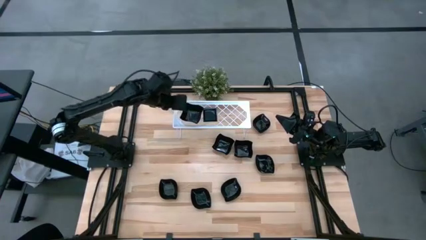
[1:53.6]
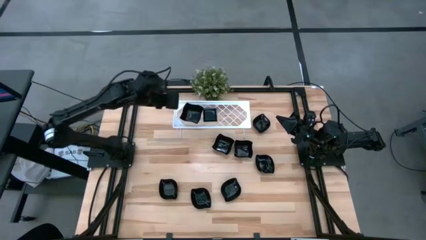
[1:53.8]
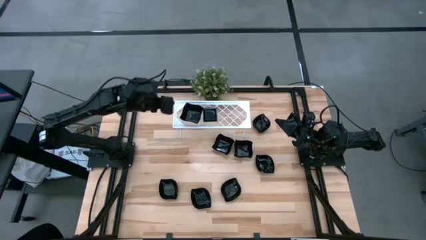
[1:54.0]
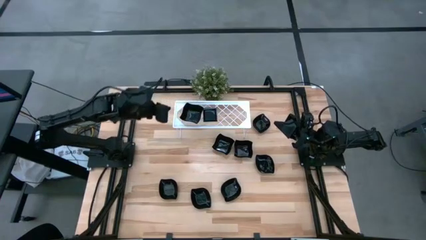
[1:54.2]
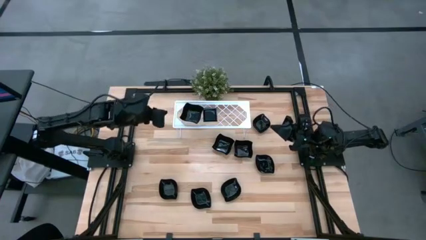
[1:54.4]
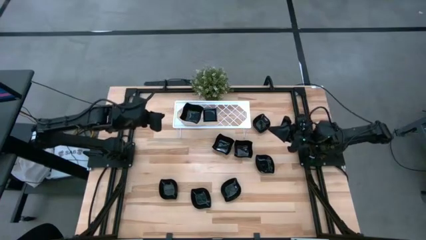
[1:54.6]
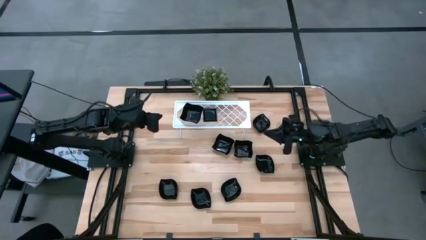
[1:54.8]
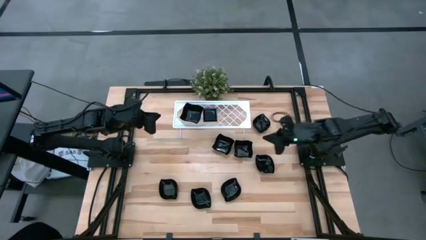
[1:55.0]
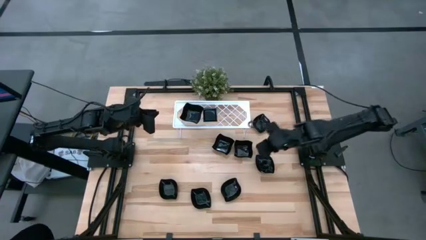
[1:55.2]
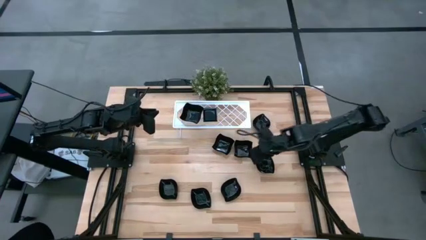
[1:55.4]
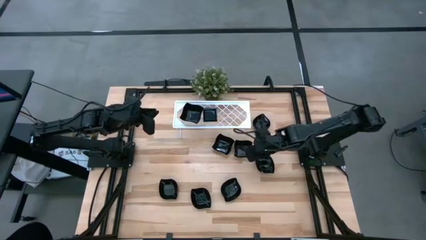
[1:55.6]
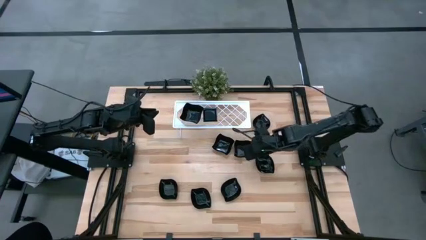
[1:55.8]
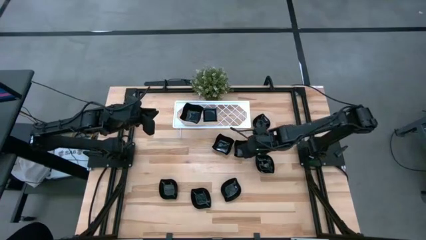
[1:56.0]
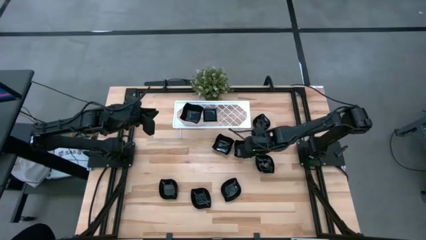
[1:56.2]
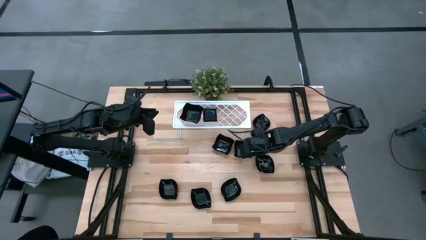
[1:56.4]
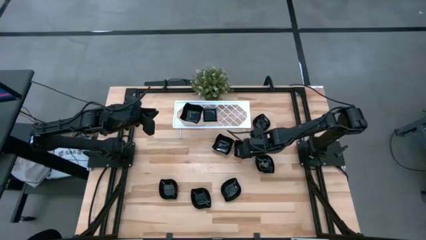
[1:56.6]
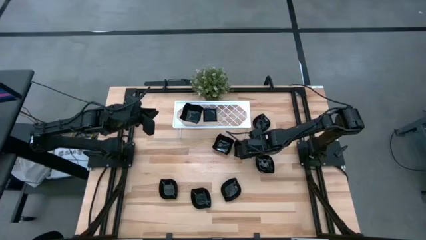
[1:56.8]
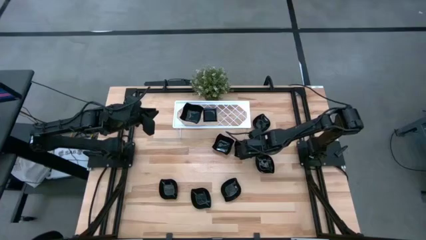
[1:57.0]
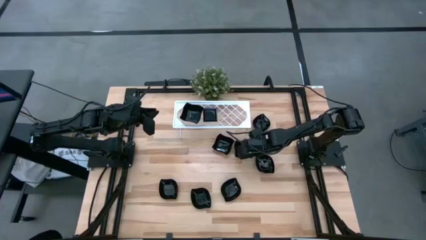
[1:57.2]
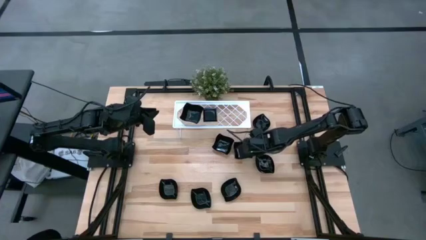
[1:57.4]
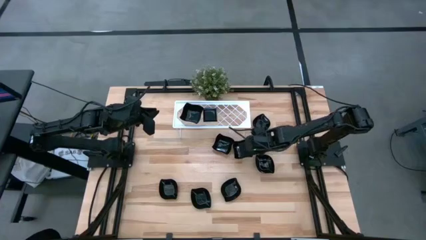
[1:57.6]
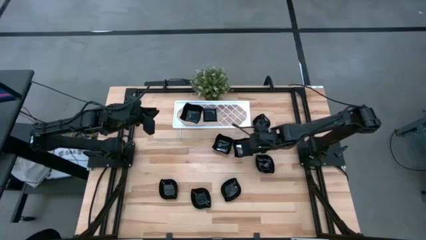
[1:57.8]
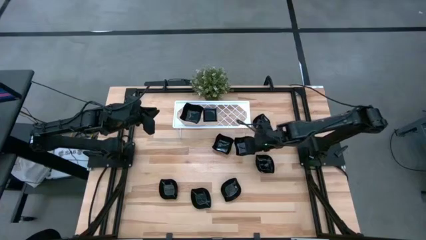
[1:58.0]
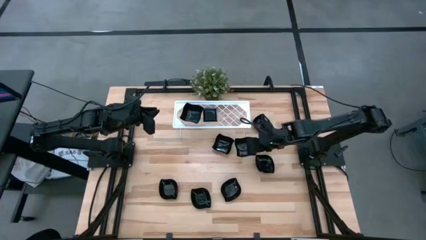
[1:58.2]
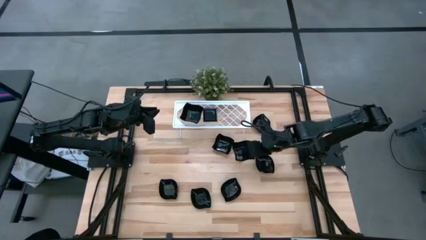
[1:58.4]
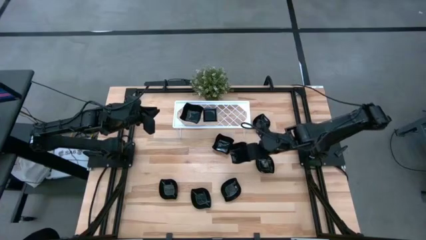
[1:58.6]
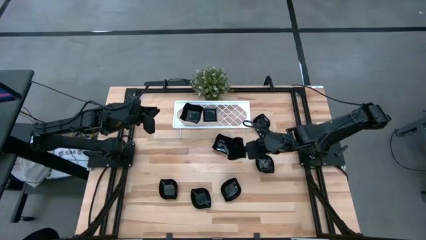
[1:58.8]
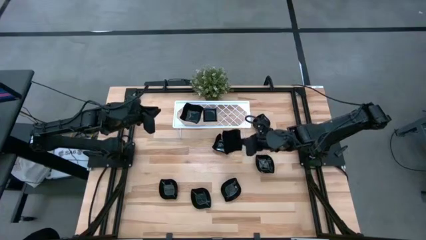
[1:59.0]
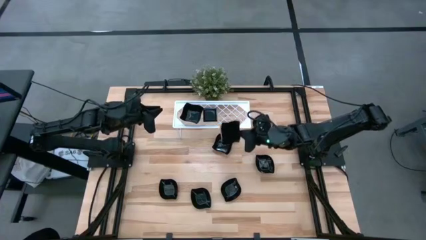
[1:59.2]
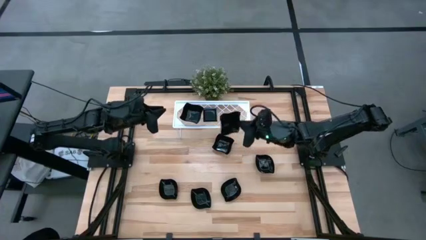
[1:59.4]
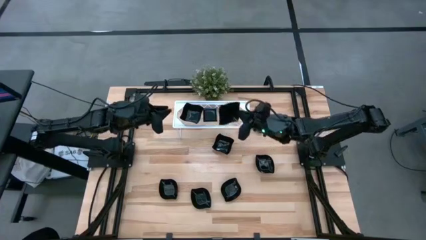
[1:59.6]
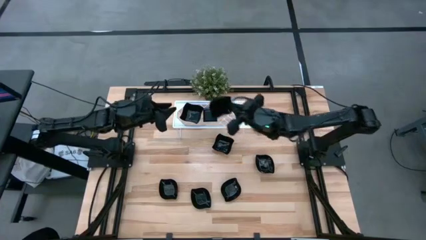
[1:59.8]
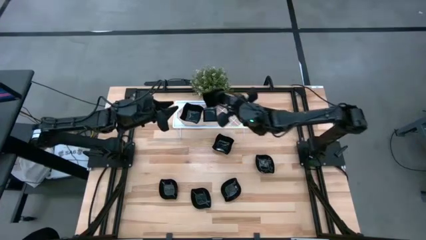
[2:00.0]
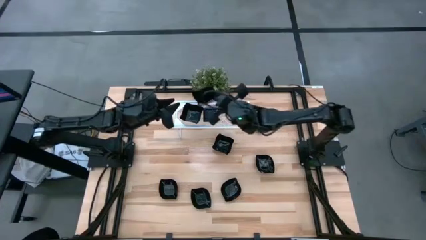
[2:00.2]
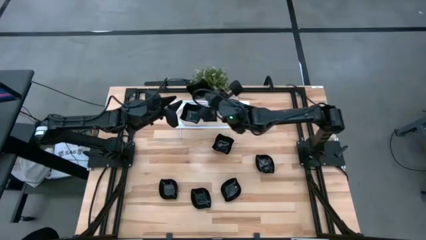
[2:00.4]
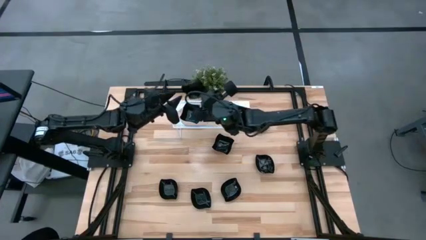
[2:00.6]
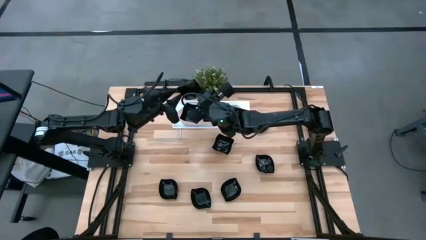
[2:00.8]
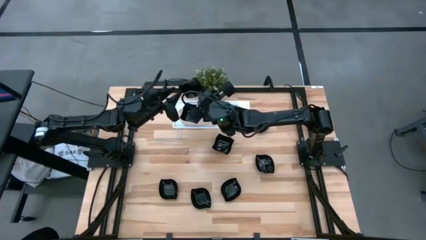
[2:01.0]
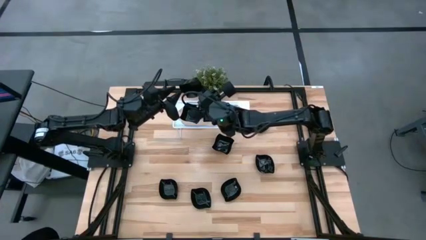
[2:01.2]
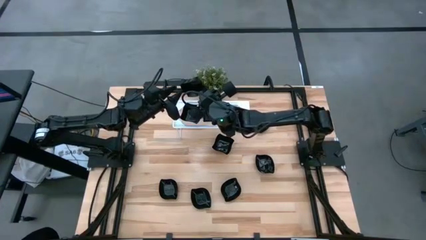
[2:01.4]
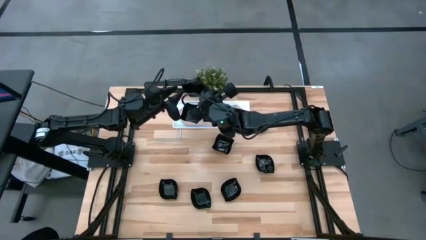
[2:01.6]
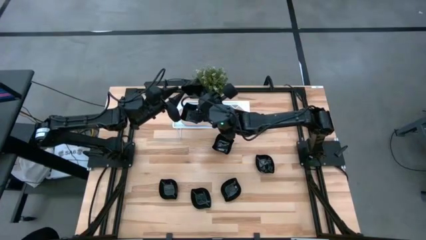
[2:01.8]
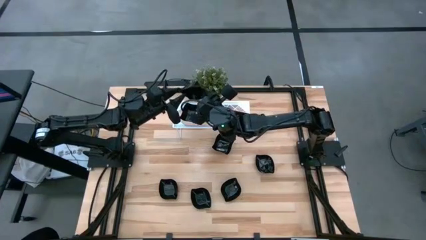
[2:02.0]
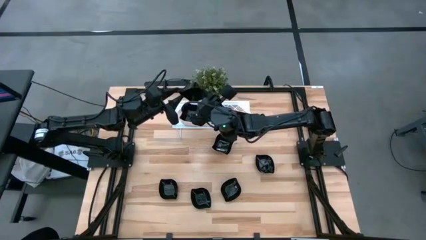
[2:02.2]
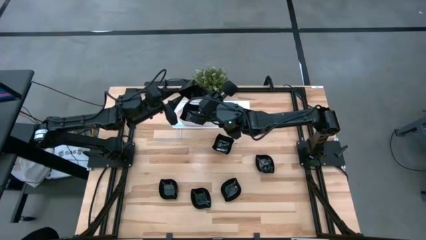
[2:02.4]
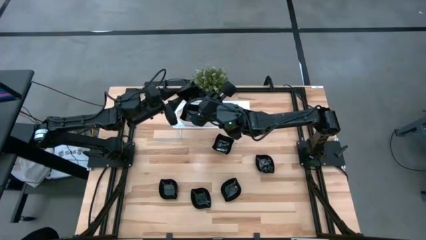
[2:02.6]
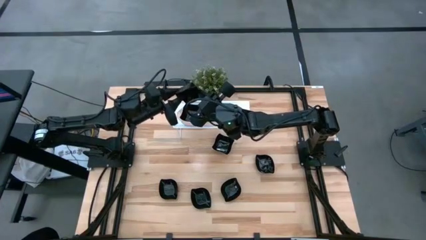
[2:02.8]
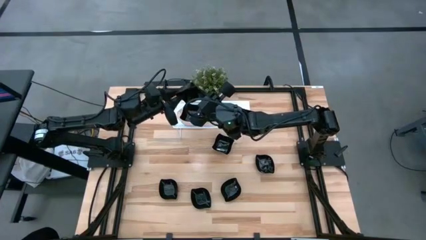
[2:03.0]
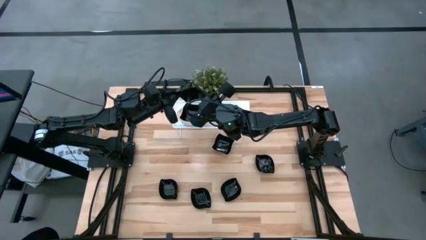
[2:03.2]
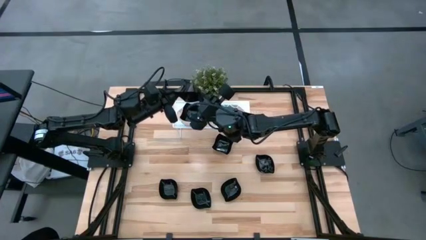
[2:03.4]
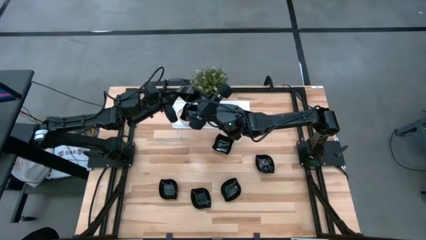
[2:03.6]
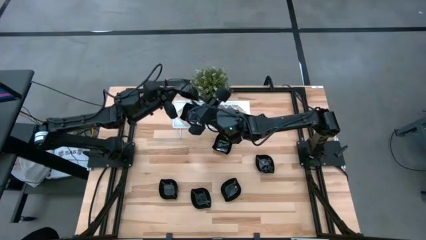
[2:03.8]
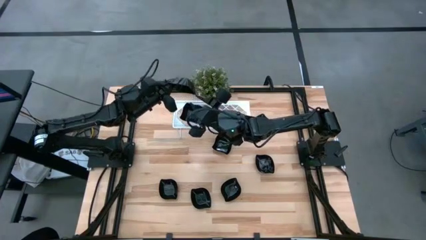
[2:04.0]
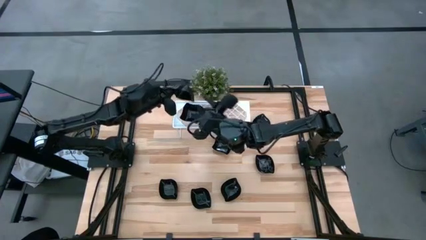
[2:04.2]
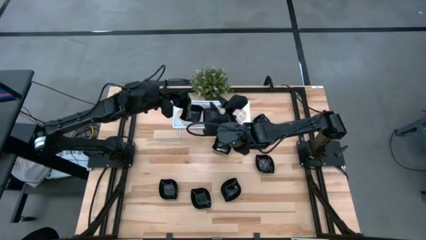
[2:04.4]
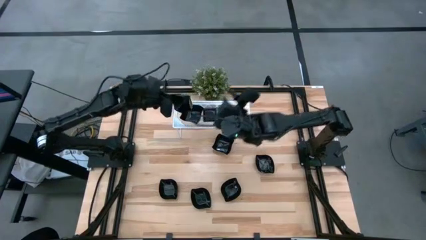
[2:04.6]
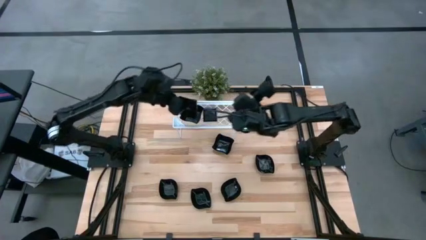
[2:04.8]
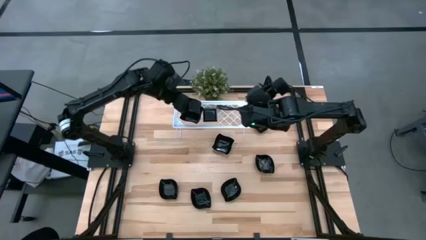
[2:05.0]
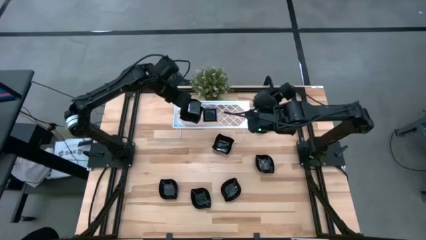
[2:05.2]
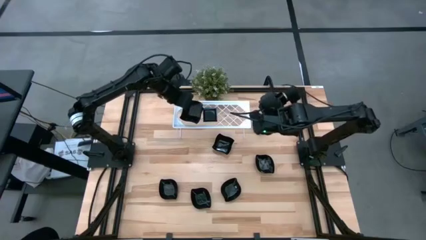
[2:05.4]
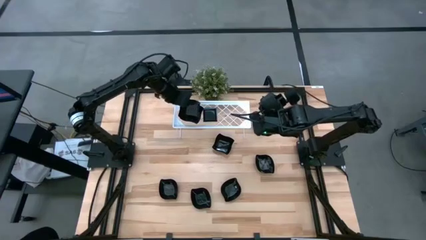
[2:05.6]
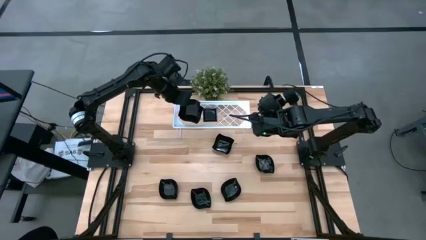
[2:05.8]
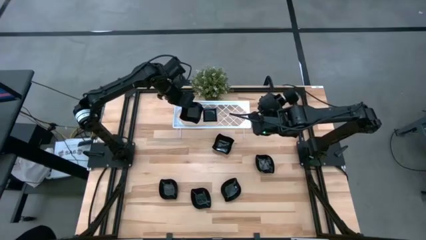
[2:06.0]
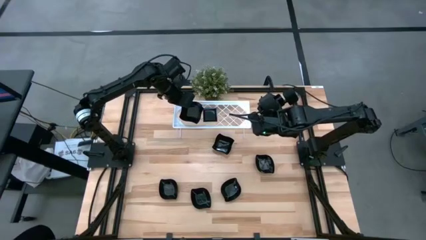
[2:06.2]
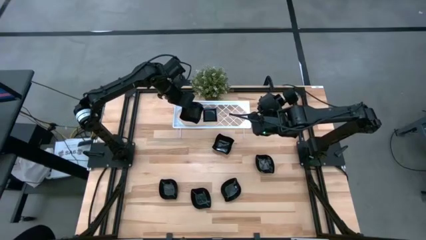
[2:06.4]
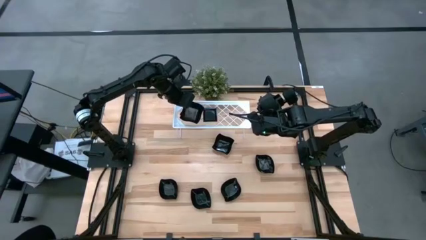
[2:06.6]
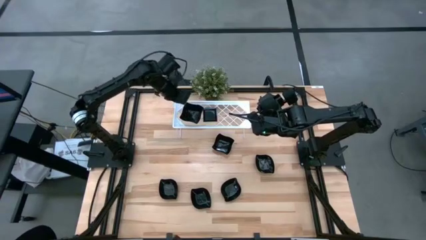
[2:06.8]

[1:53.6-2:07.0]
Task: Pick & Place Mini shaped plates
Stack the right distorted square plate on top of the stacked distorted square plate on the shelf
